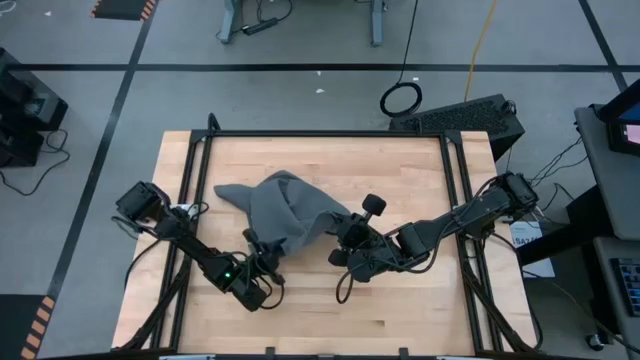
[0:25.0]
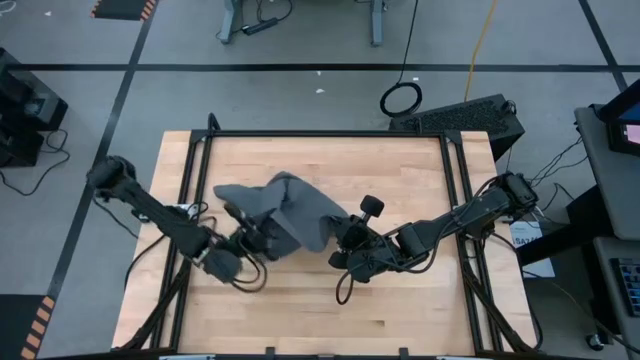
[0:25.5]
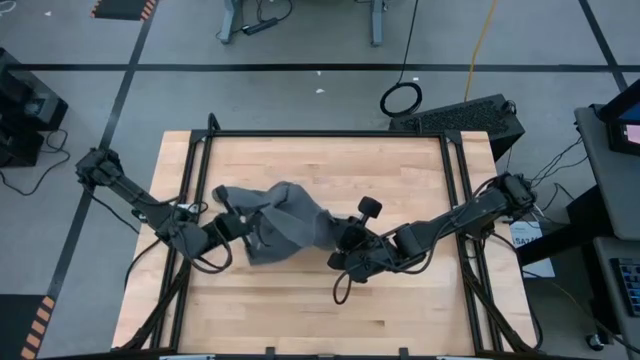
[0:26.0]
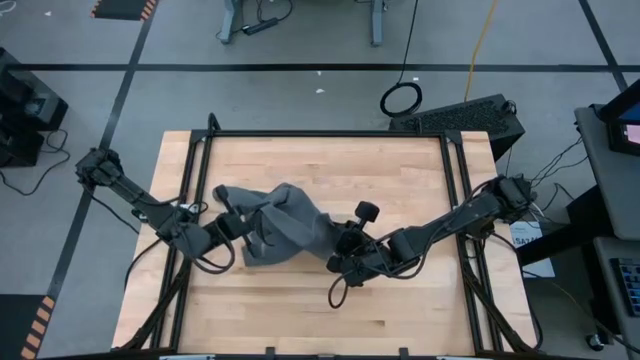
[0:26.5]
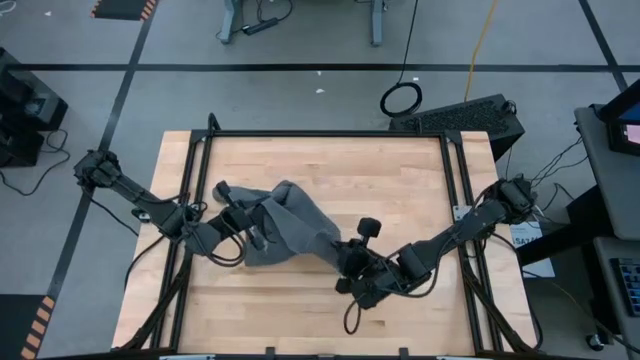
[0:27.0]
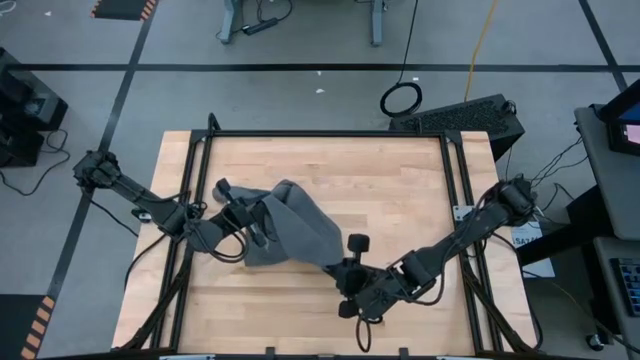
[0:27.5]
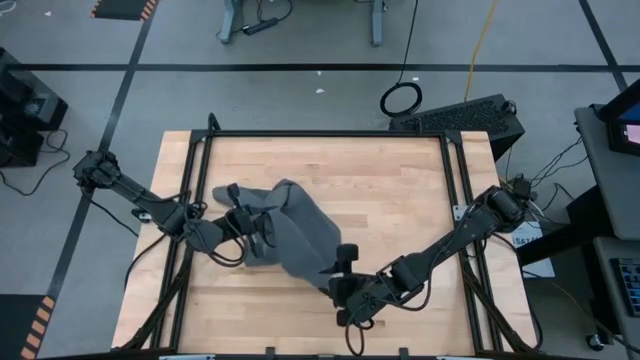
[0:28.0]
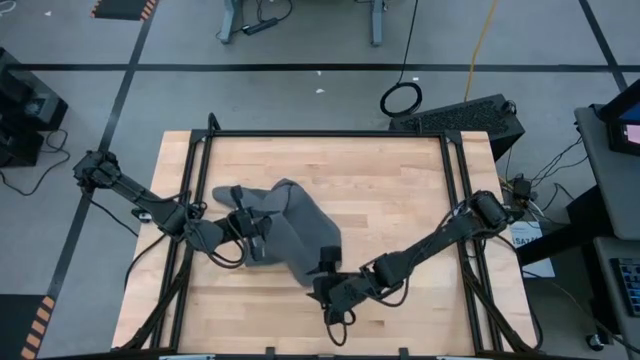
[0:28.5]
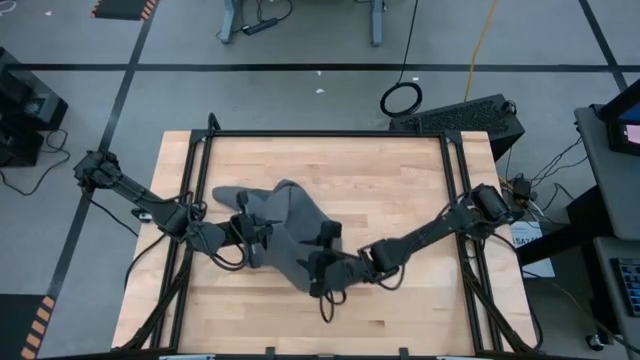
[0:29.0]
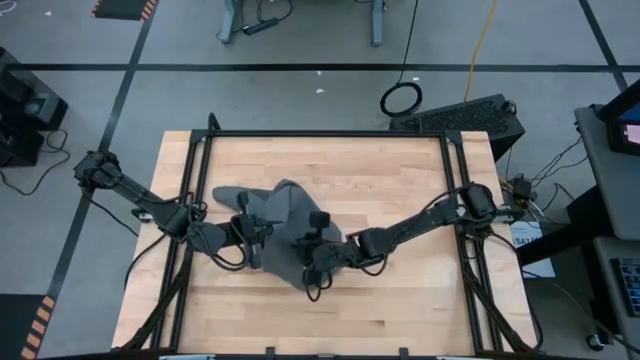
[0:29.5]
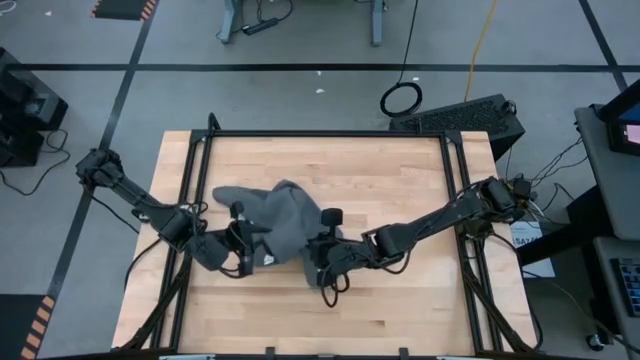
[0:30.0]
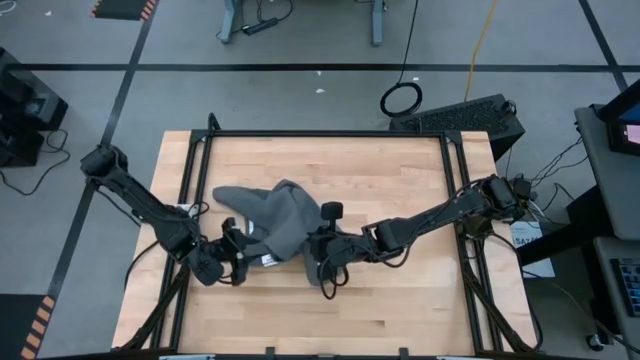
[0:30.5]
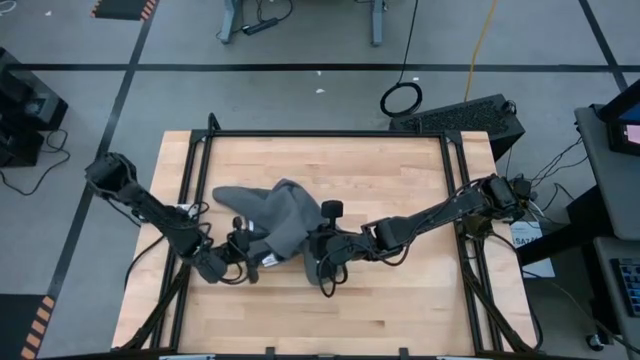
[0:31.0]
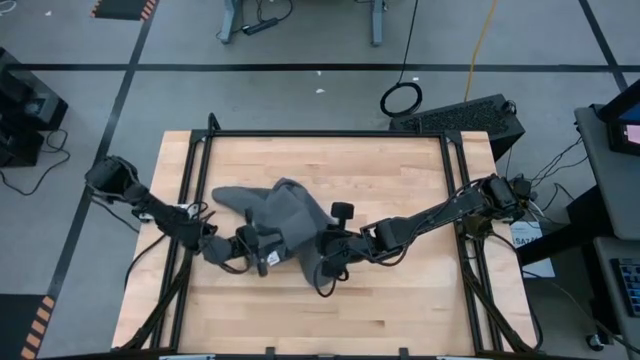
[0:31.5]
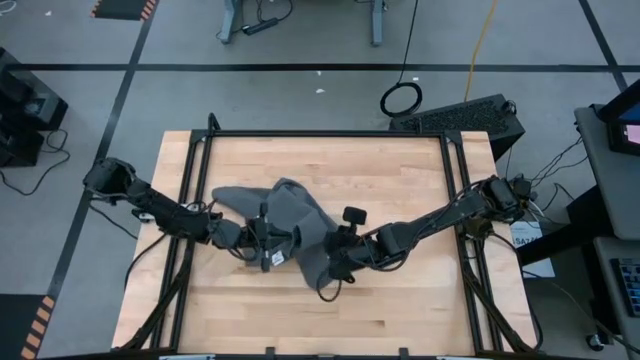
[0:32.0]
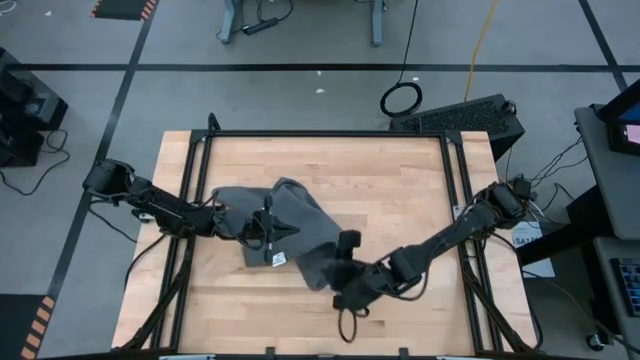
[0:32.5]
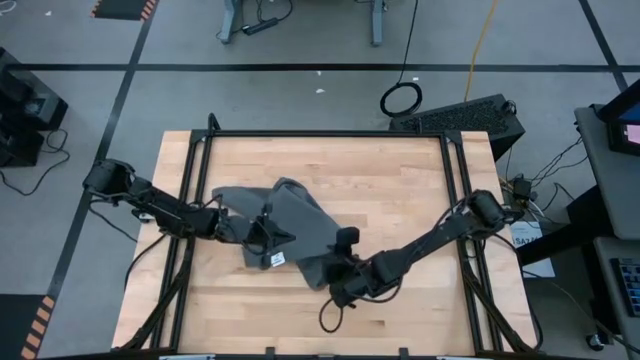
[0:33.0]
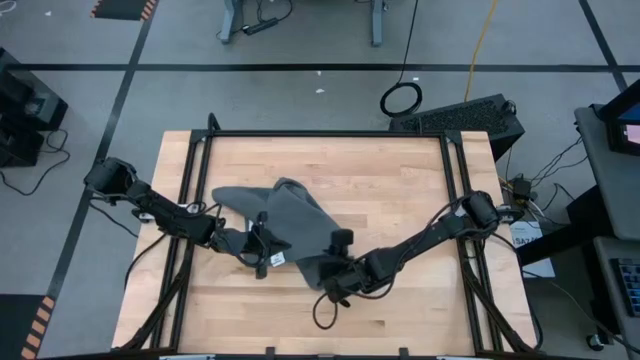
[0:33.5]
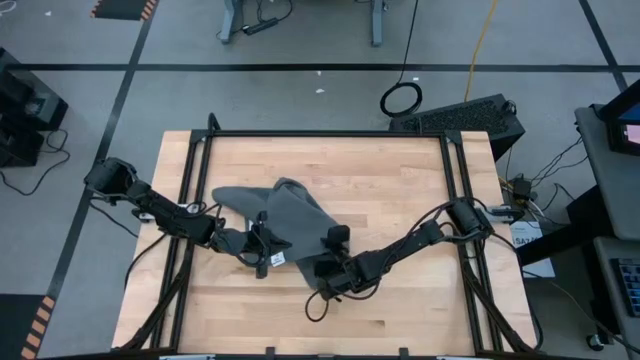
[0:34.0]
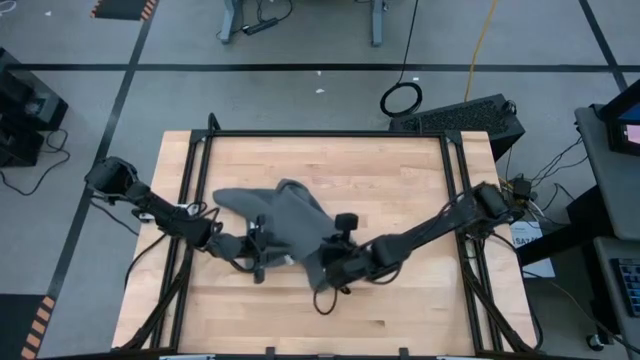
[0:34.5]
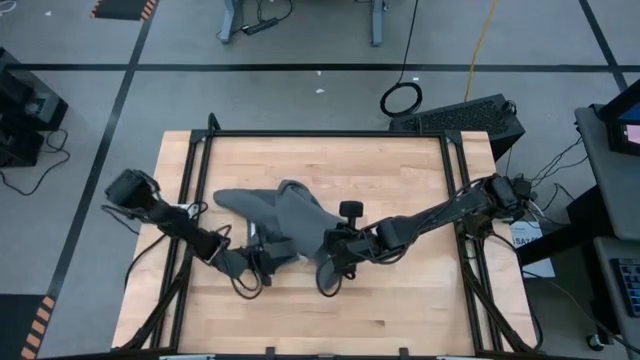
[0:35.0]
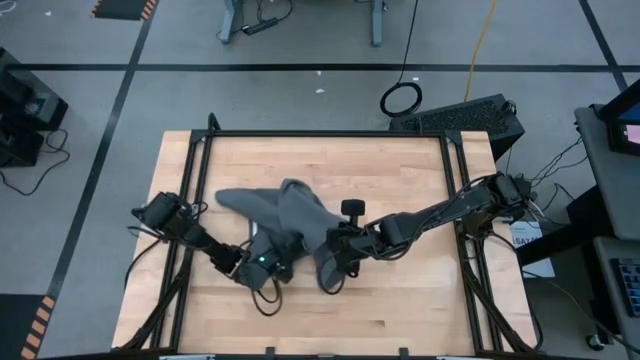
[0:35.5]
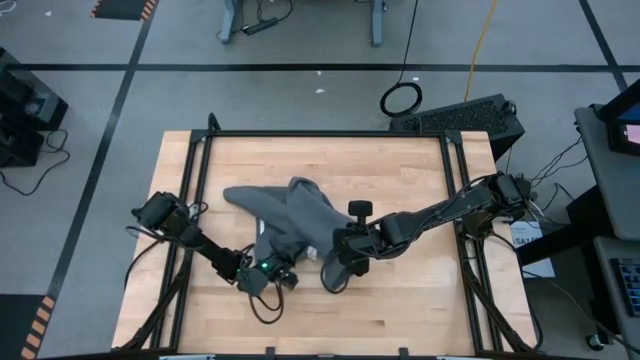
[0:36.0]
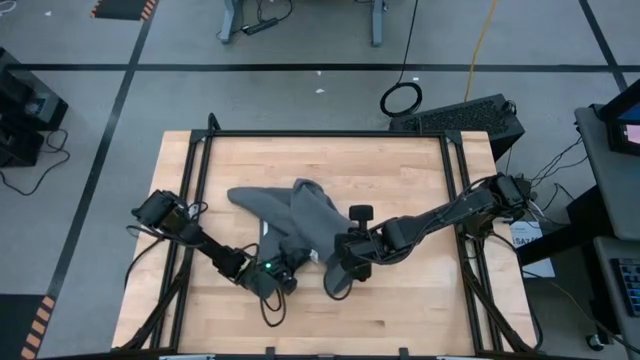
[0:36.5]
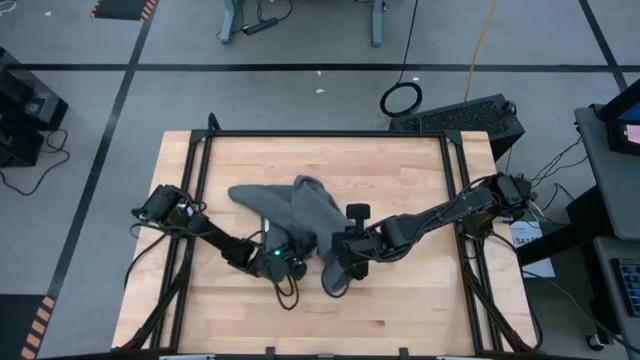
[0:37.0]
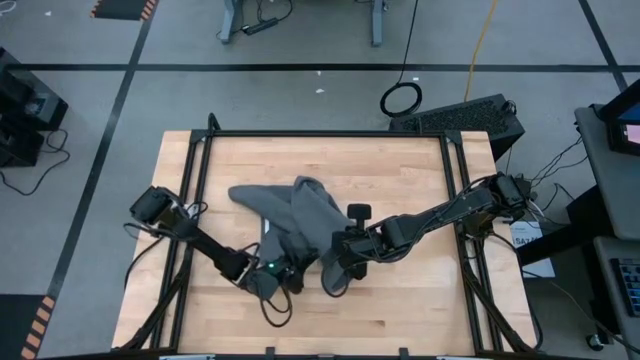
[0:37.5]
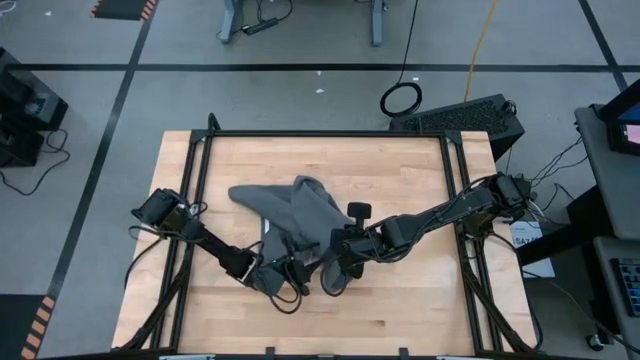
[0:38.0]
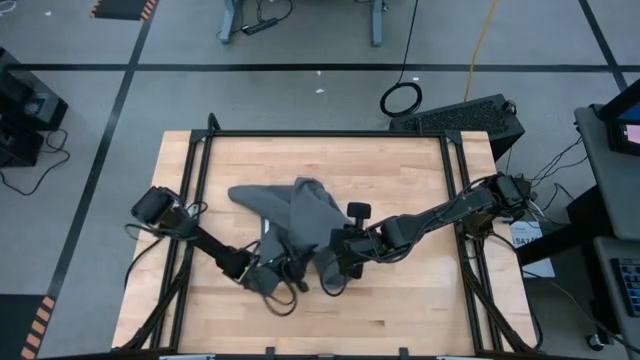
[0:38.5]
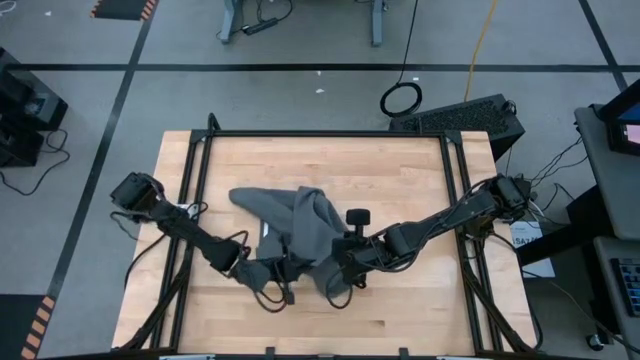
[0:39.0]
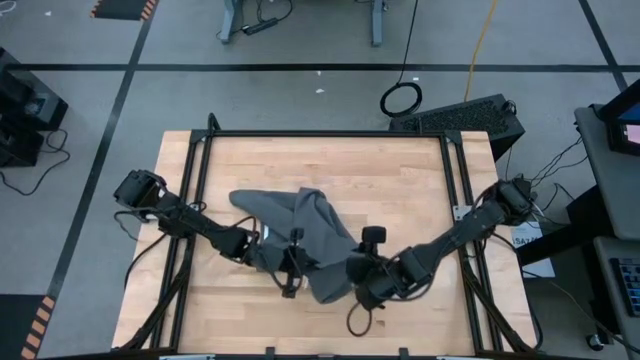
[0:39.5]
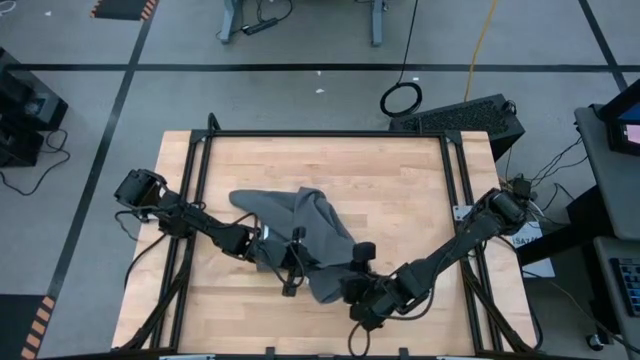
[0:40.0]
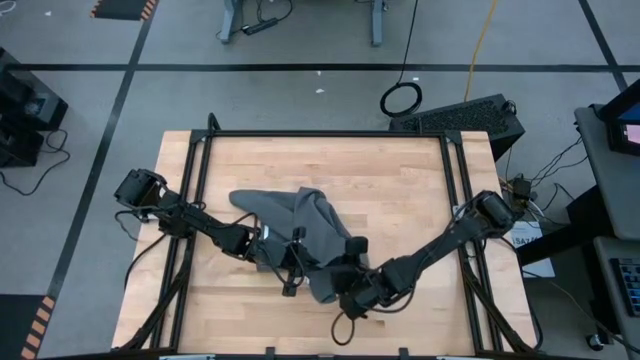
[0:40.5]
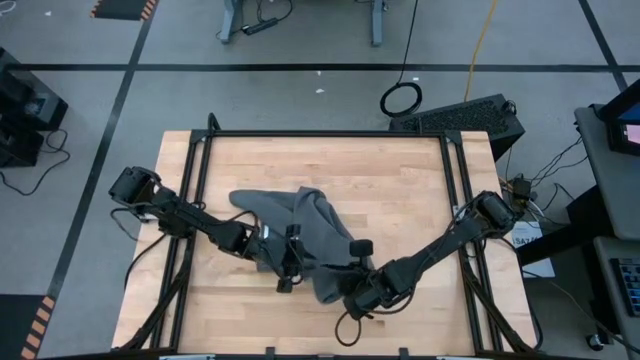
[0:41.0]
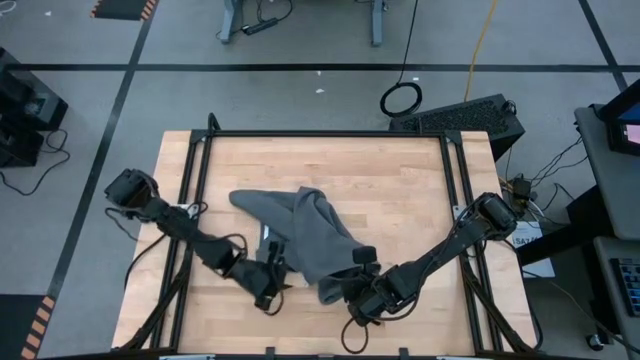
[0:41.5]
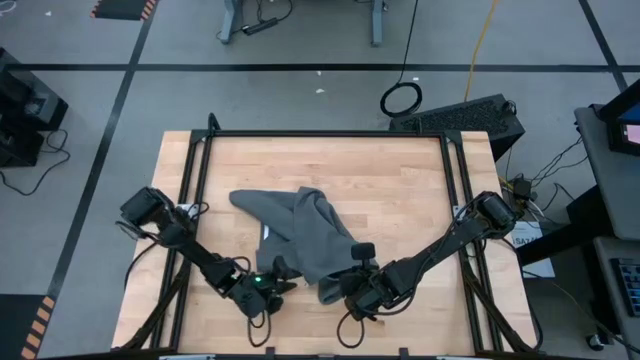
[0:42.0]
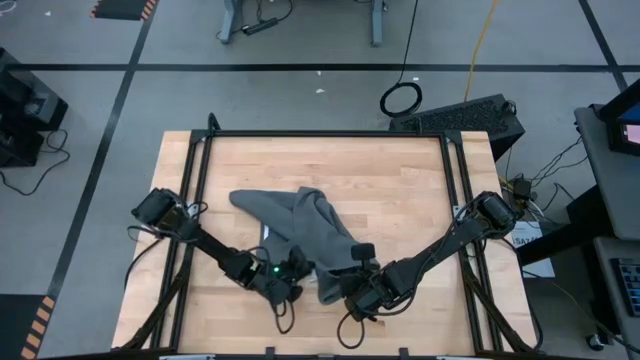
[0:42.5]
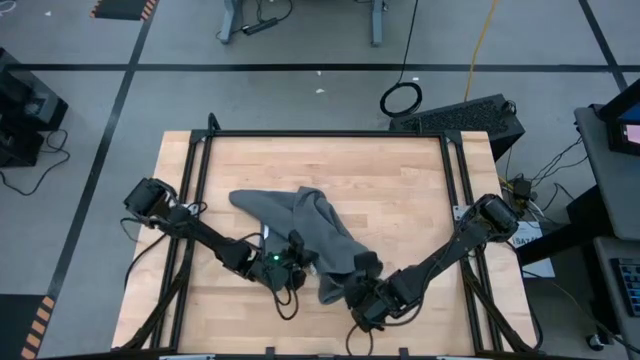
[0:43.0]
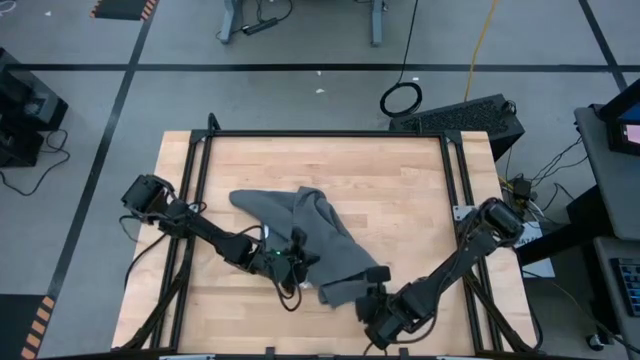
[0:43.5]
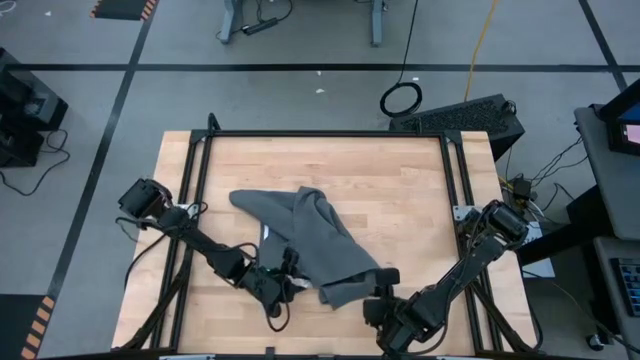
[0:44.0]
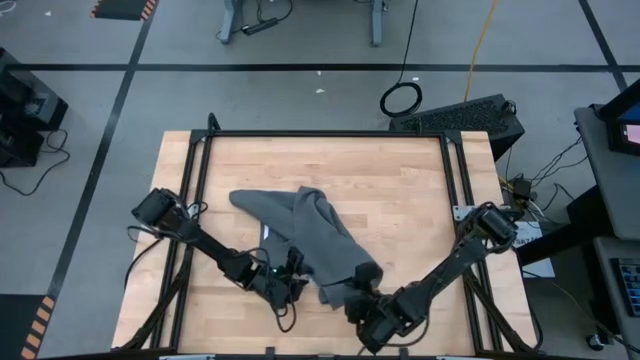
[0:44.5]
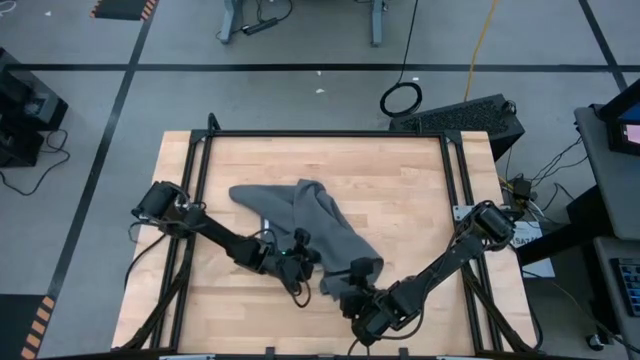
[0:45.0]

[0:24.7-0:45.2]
Task: Roll towel into tight, uniform cylinder
Roll the gray towel

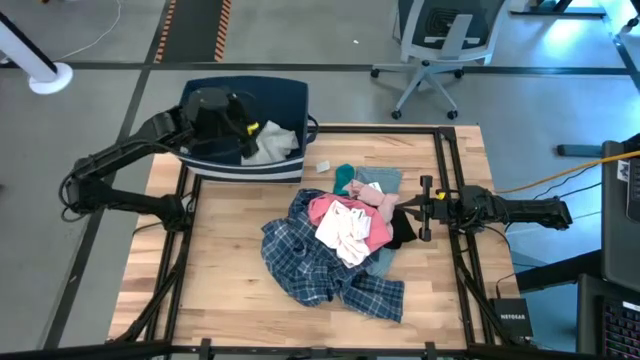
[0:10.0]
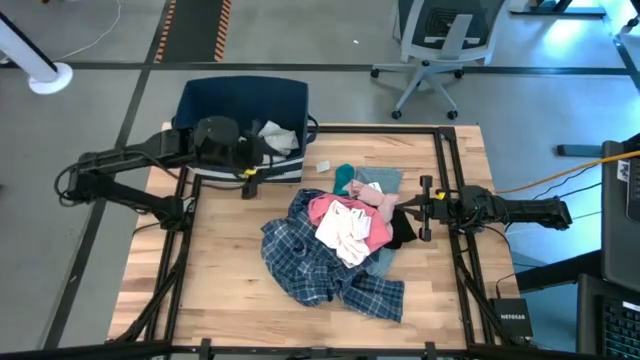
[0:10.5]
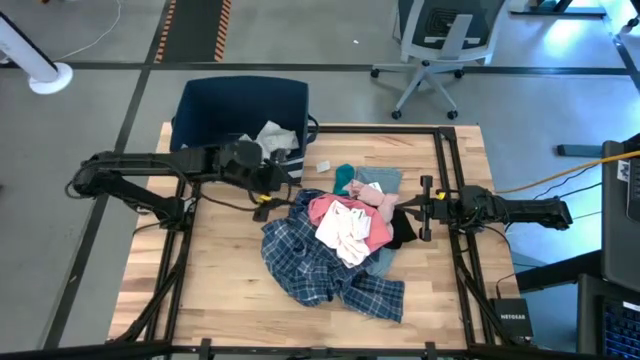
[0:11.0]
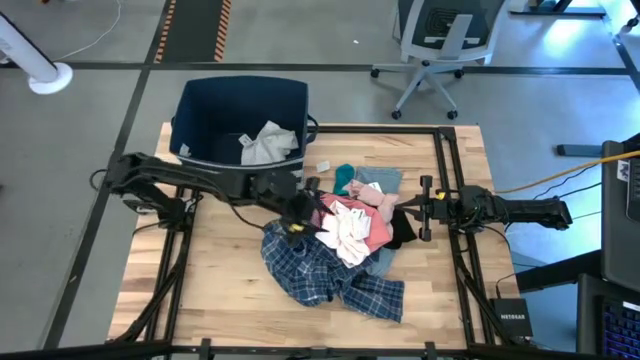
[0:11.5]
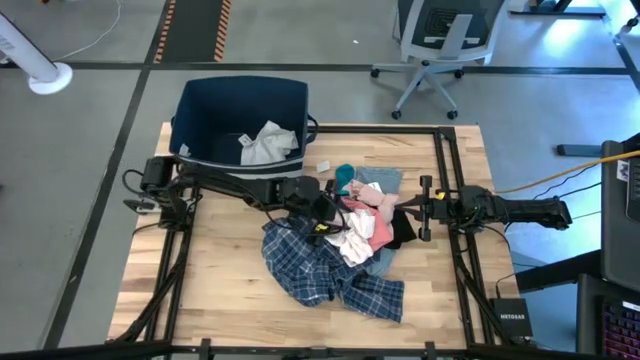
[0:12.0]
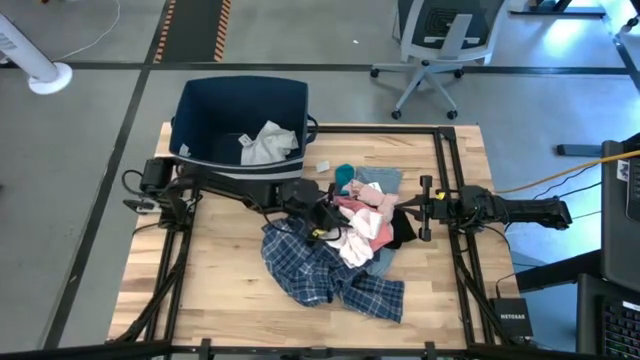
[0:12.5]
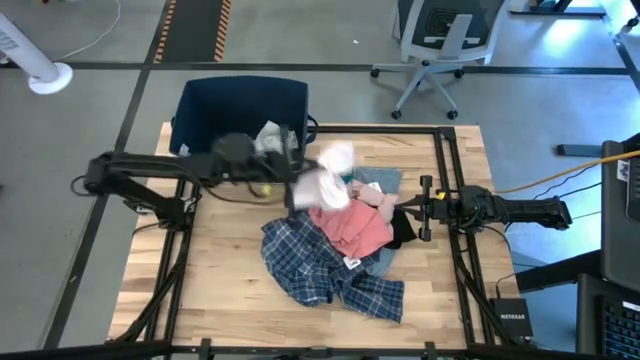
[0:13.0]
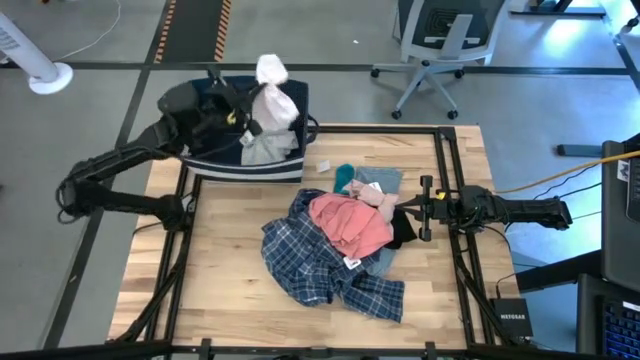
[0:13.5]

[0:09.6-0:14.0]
Task: Sort clothes
Put the white underwear into the blue laundry bin
